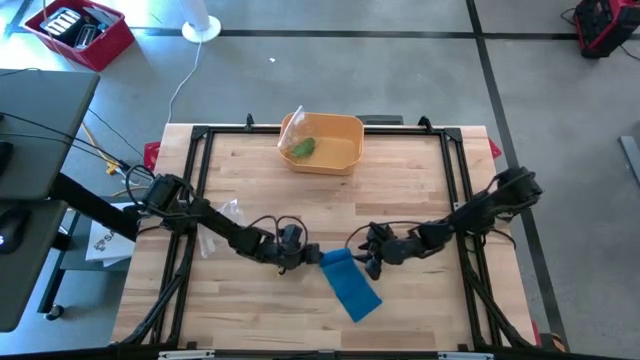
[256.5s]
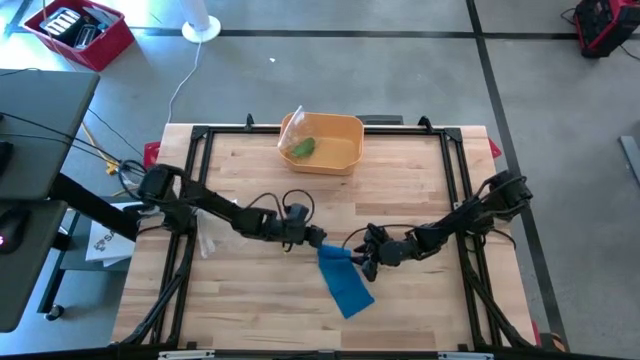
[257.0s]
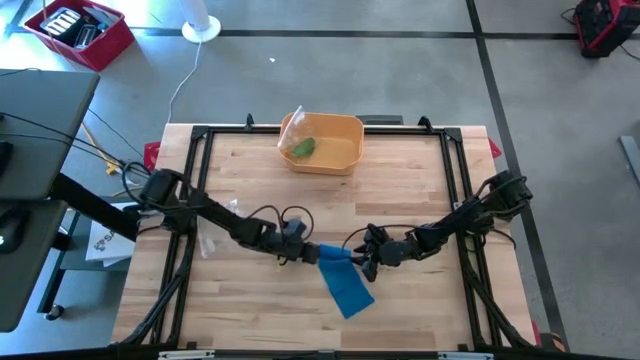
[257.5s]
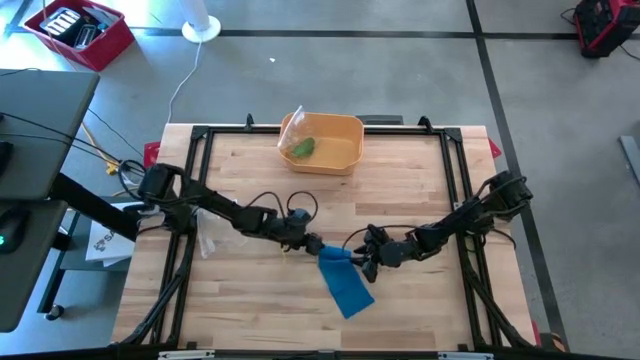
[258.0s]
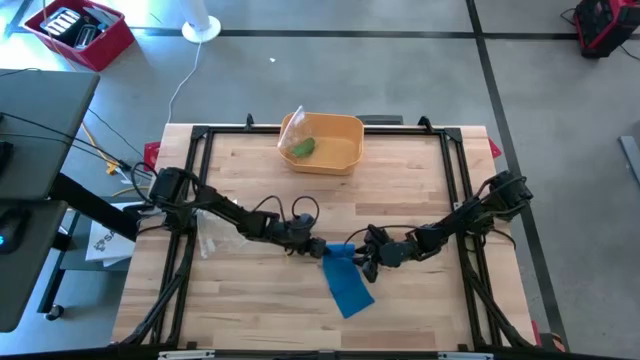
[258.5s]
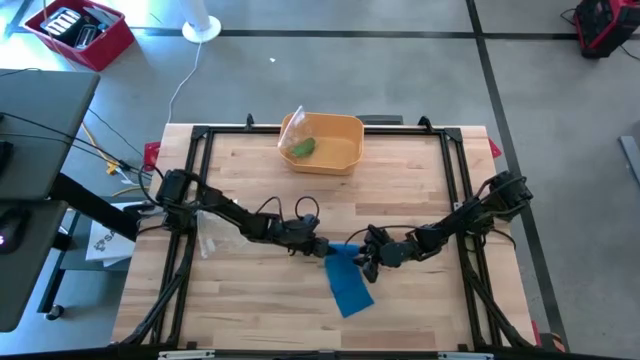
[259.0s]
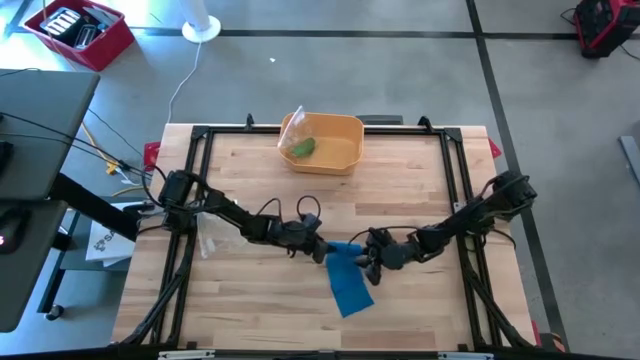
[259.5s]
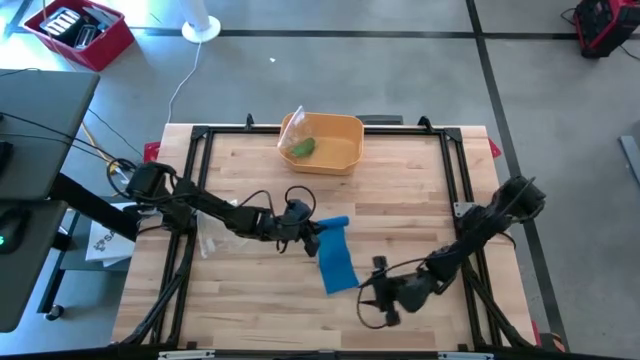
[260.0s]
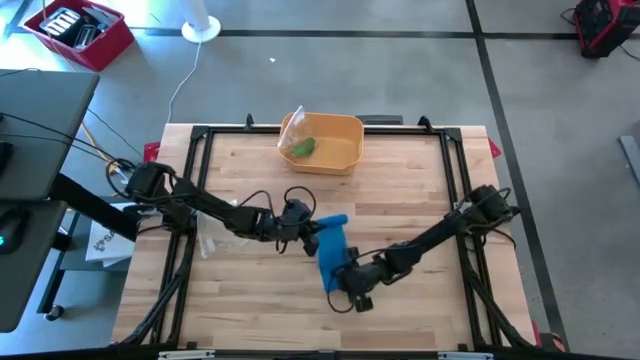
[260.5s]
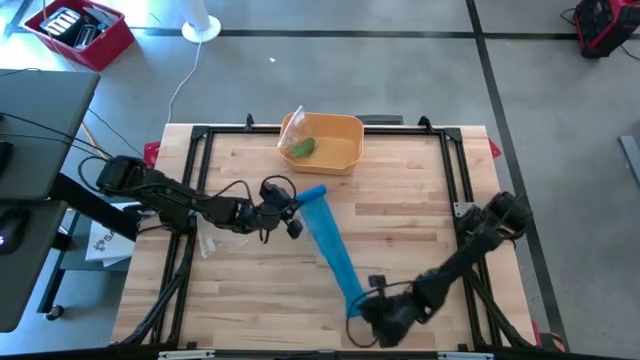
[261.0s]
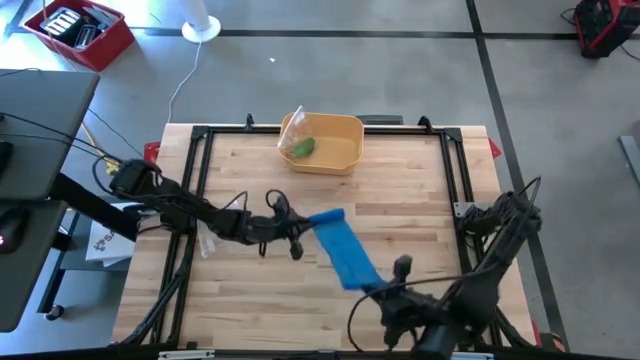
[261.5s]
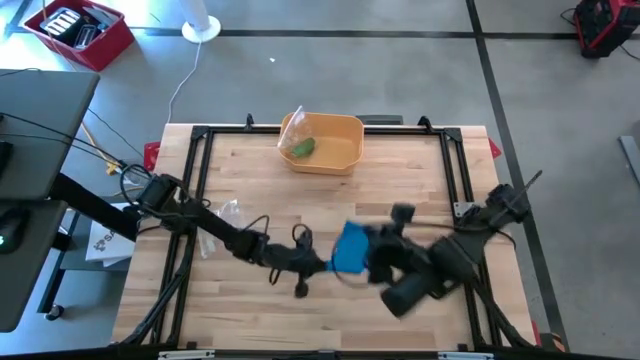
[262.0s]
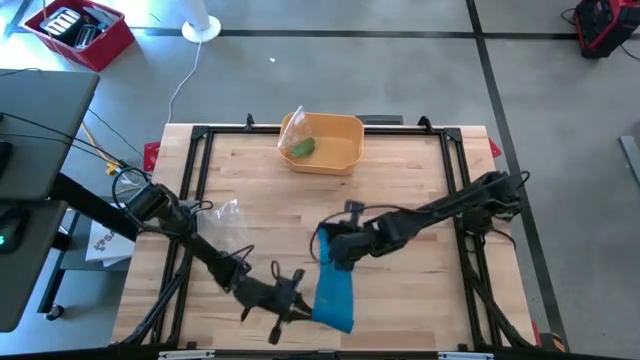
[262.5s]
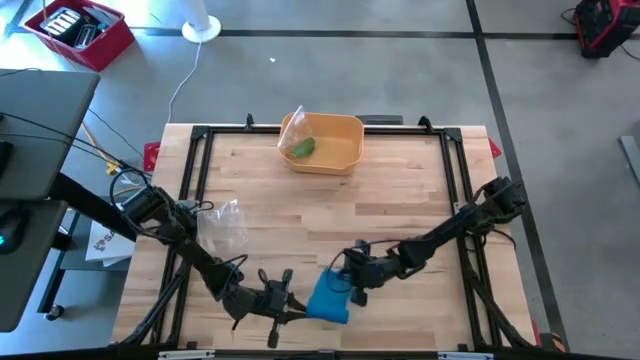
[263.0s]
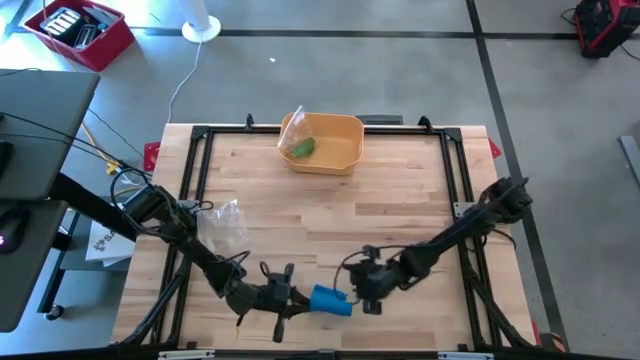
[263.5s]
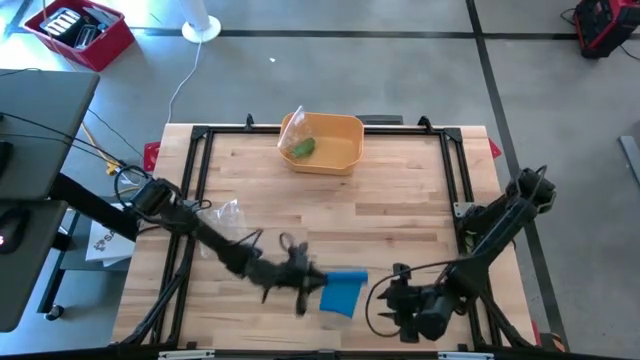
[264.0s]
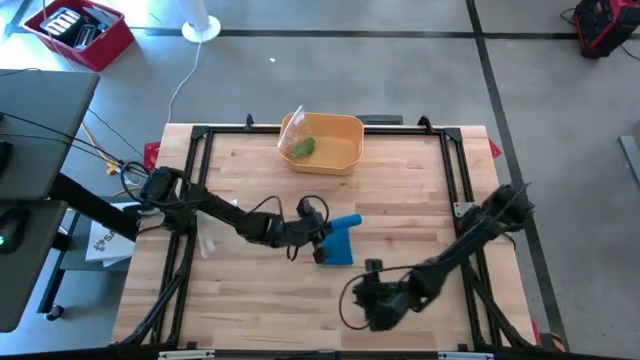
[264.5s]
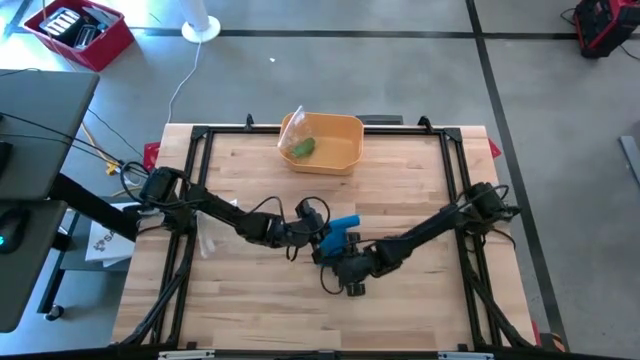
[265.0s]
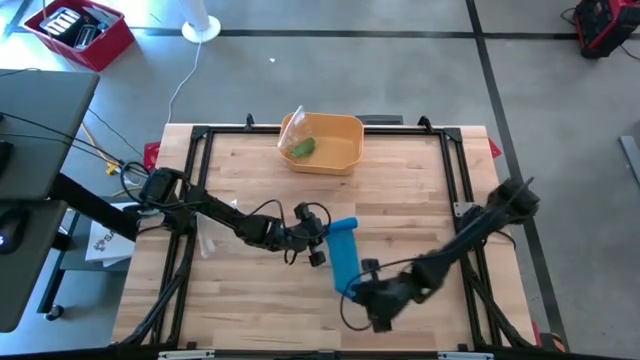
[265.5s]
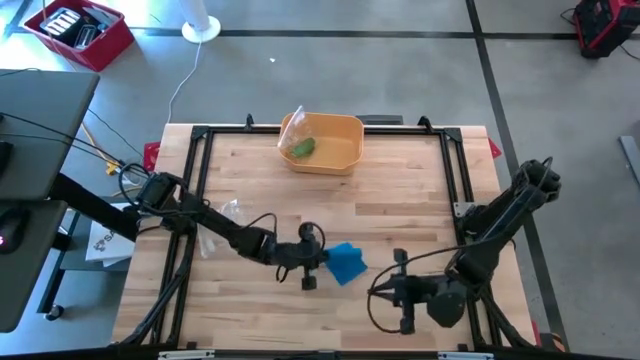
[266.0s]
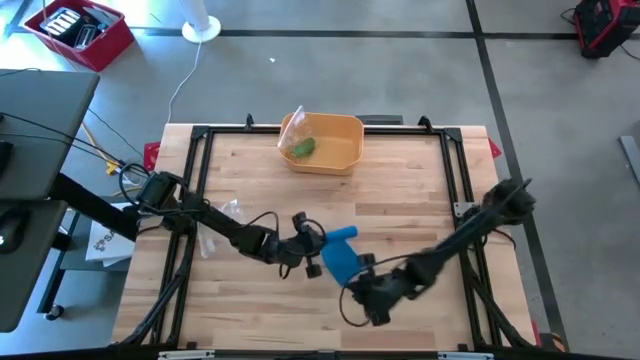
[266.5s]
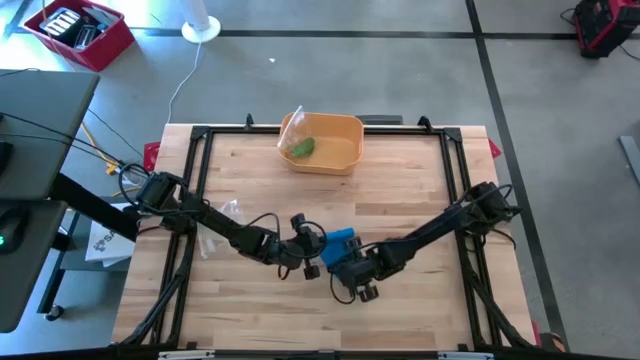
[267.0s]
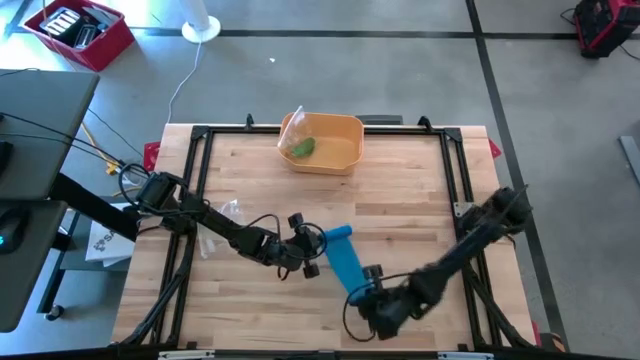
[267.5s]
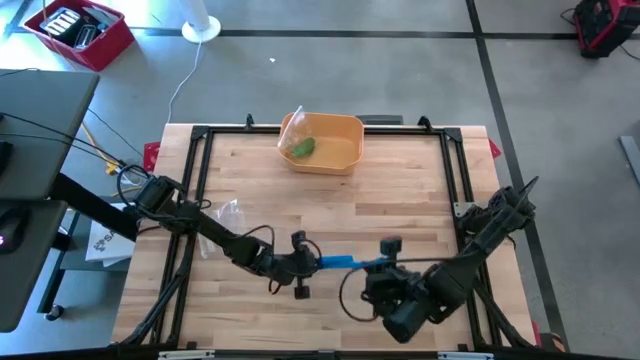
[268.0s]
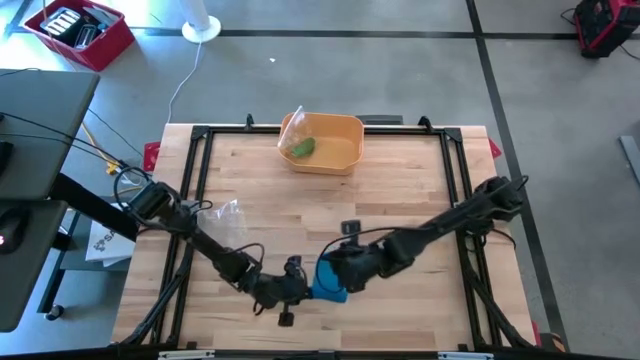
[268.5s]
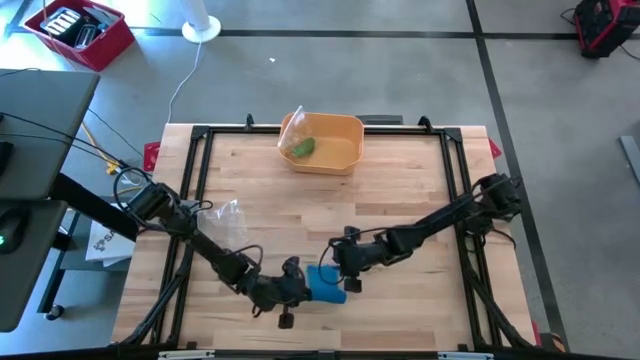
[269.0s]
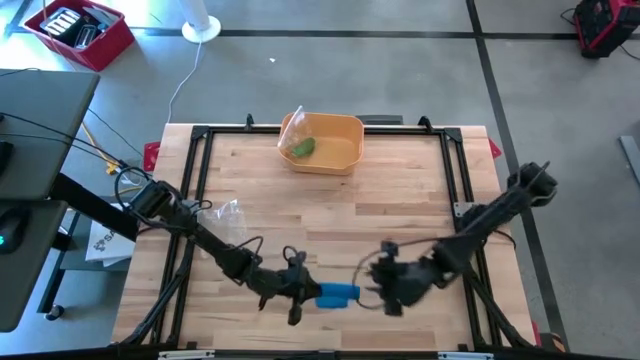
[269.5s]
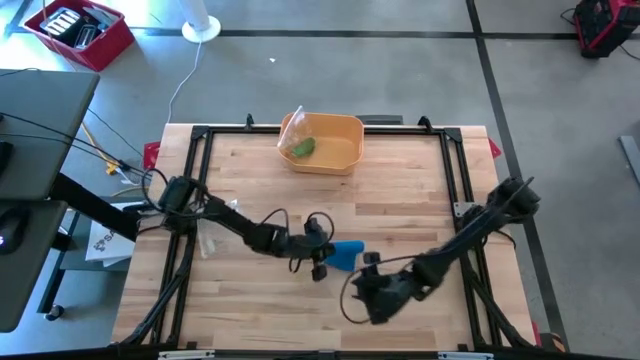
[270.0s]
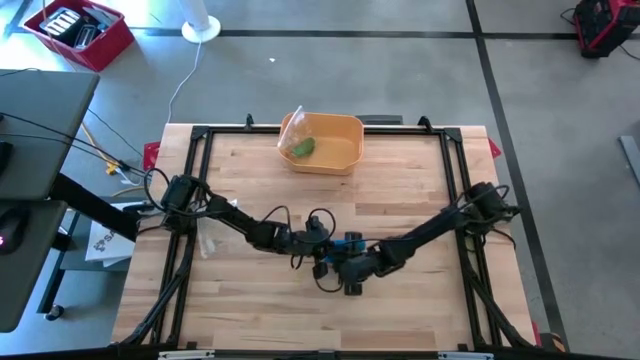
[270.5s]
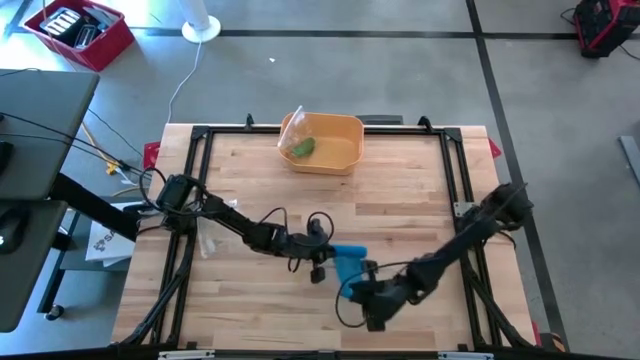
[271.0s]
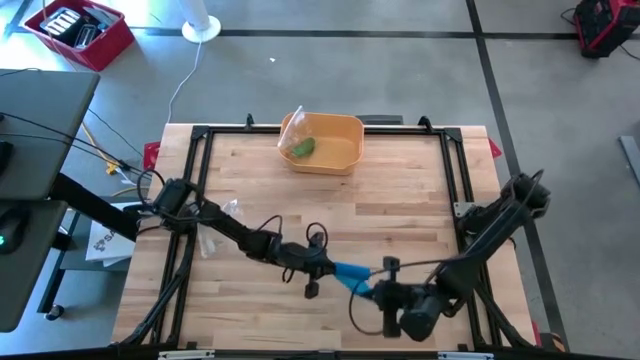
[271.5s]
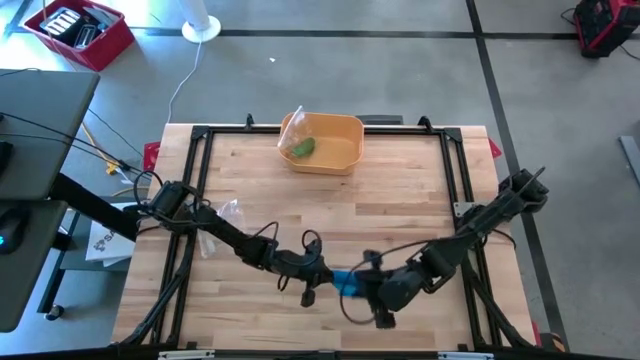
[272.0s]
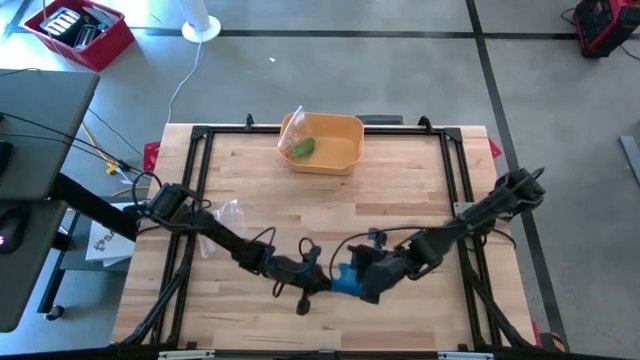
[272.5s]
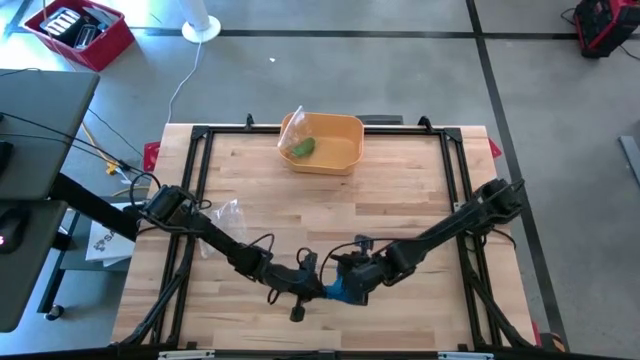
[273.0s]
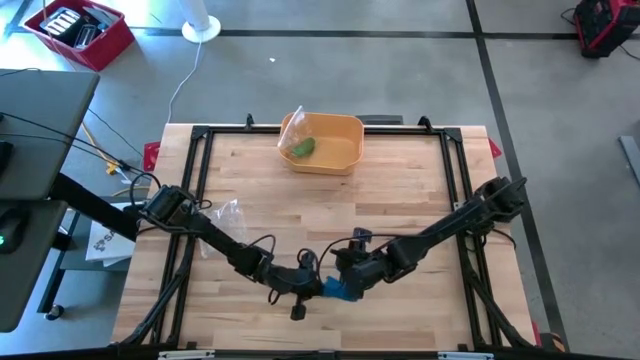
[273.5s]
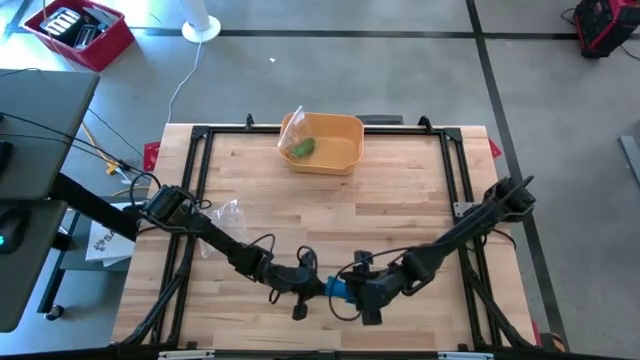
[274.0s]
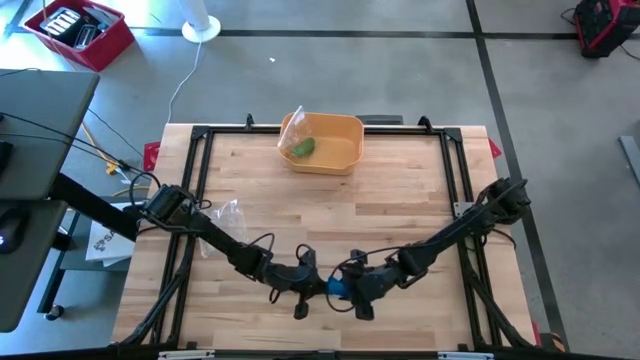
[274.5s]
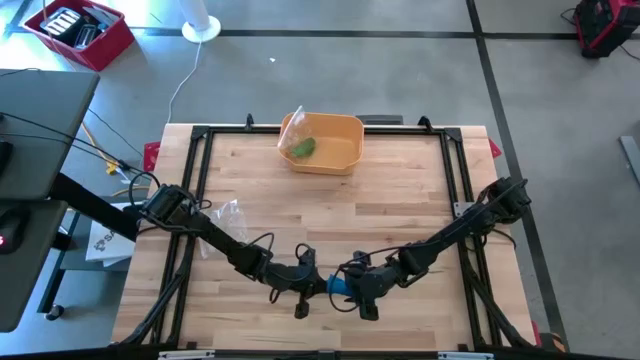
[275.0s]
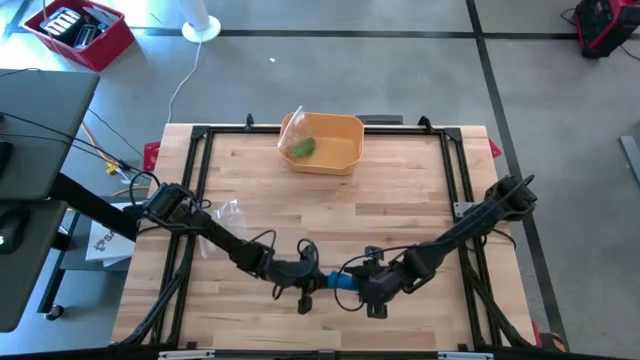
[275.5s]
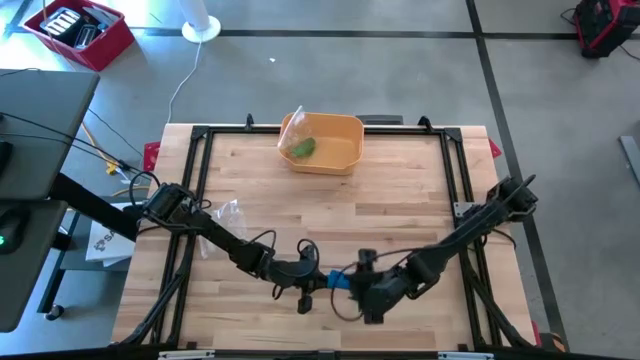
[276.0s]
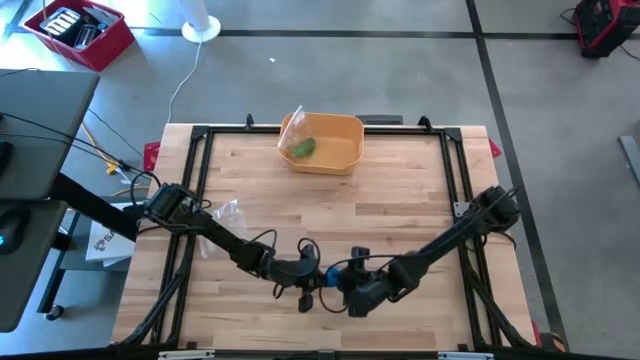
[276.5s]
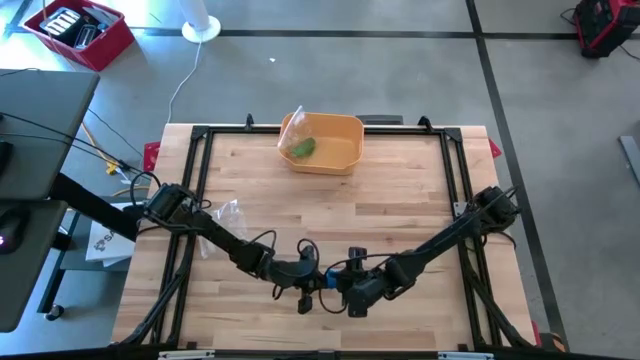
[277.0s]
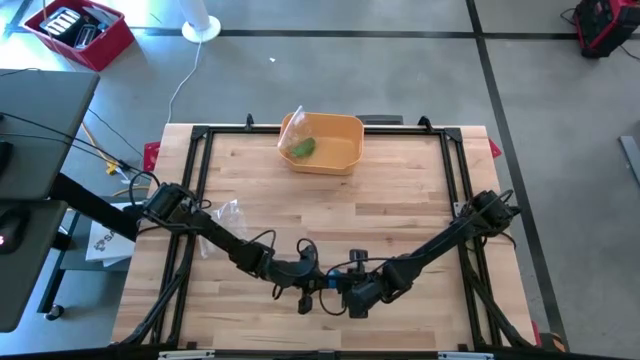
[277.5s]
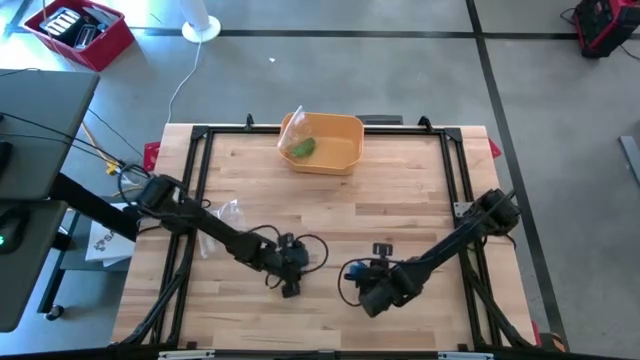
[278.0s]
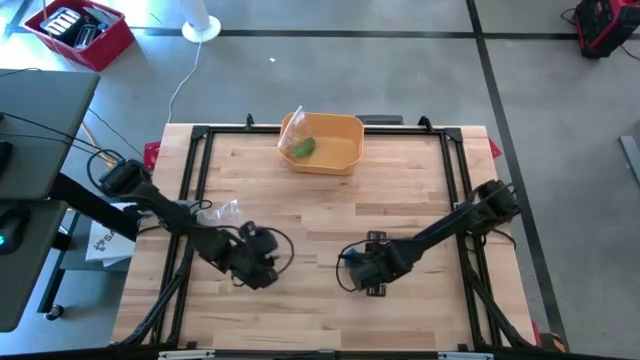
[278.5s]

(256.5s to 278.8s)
Task: Roll bandage
Roll the blue bandage
